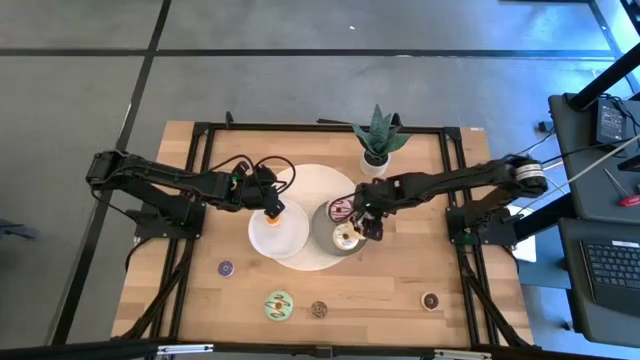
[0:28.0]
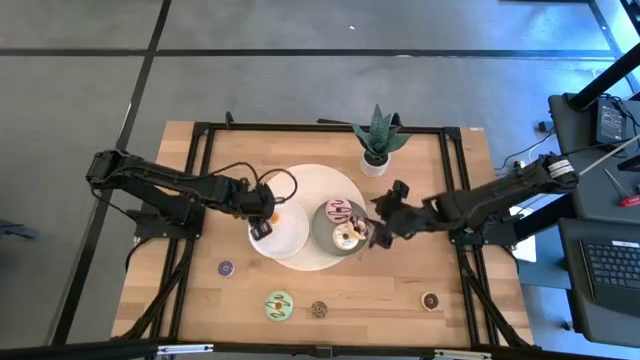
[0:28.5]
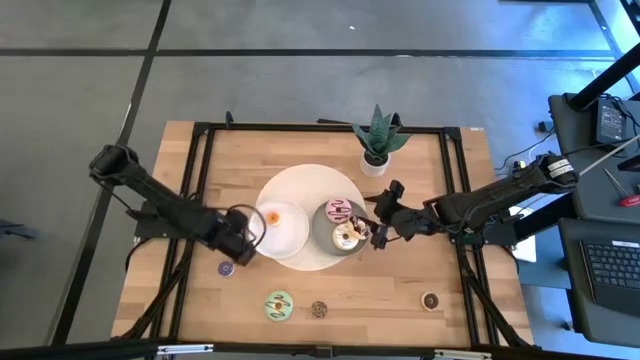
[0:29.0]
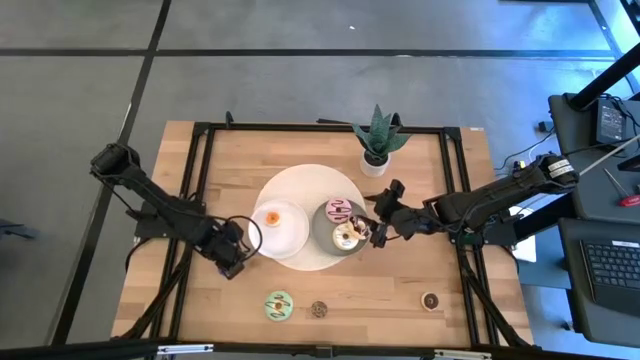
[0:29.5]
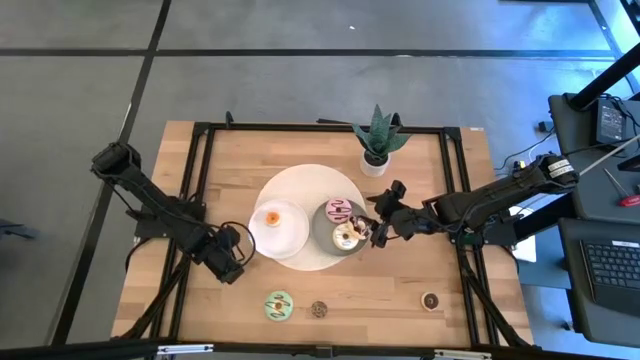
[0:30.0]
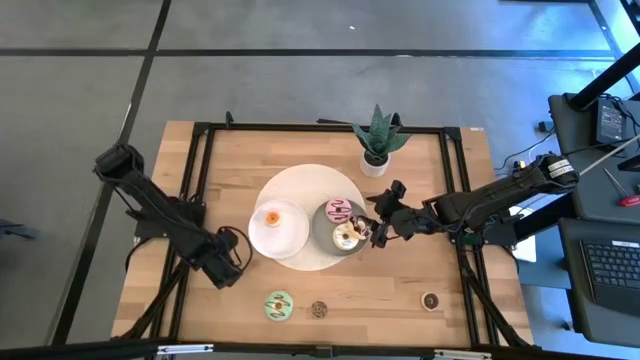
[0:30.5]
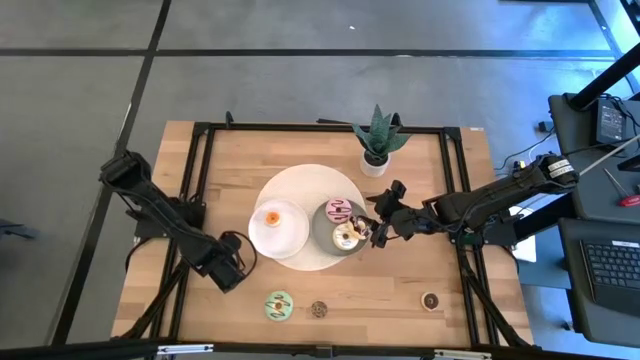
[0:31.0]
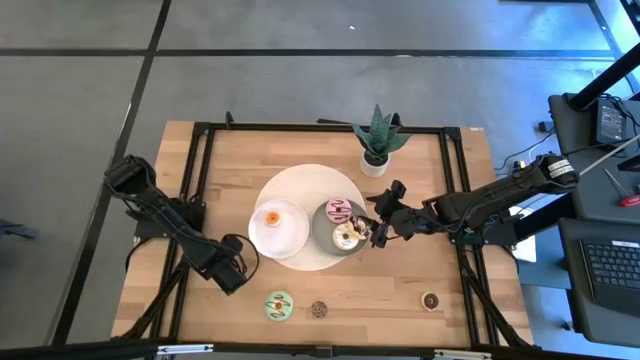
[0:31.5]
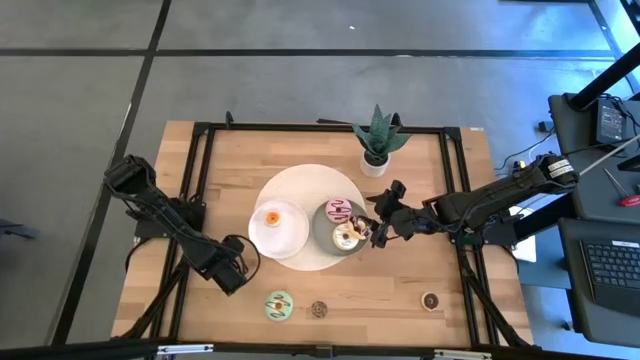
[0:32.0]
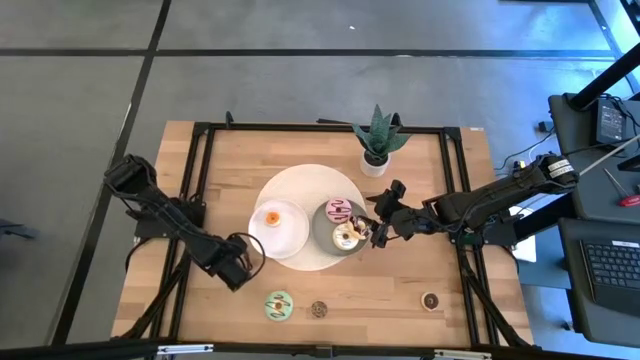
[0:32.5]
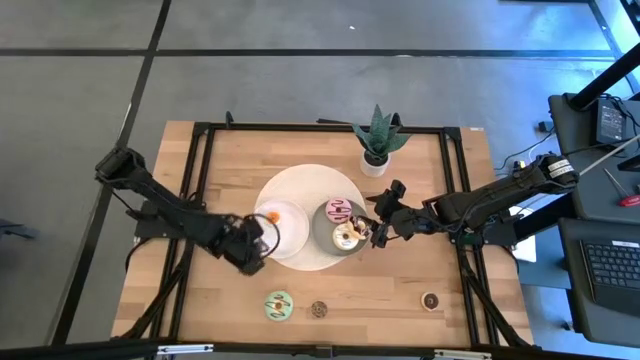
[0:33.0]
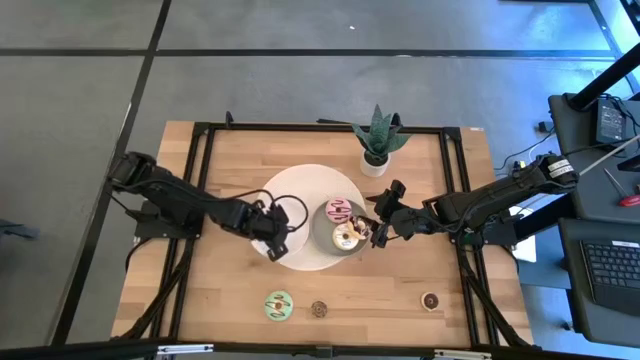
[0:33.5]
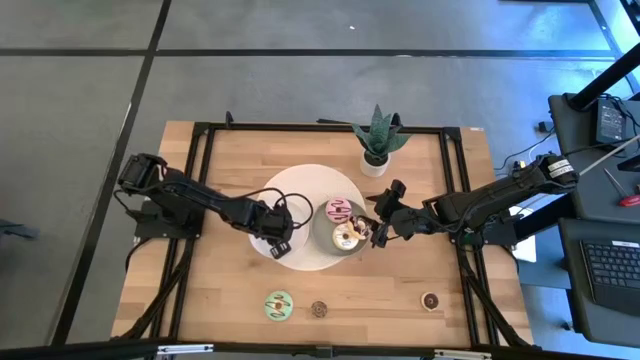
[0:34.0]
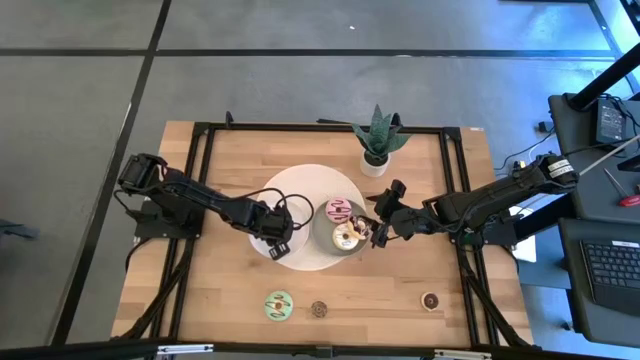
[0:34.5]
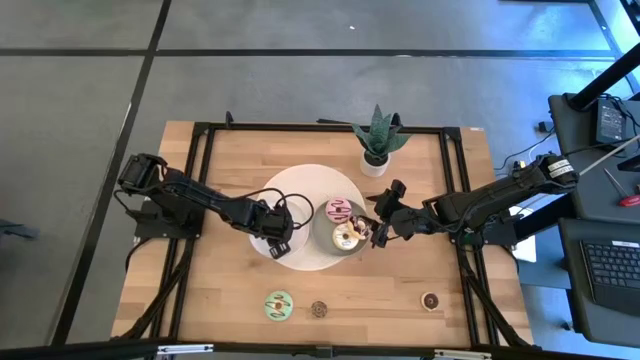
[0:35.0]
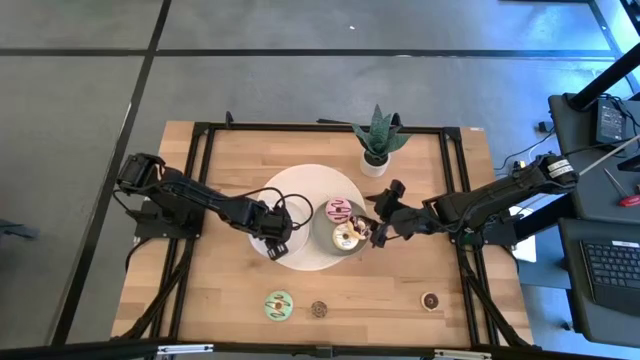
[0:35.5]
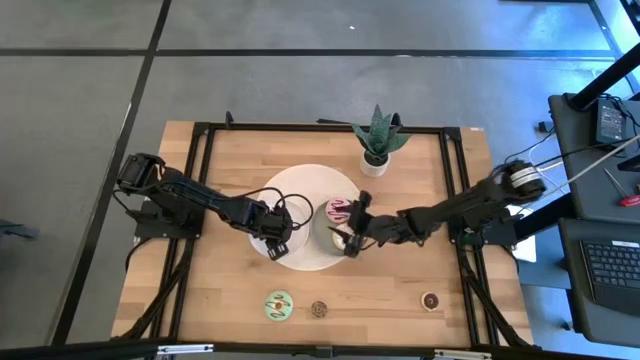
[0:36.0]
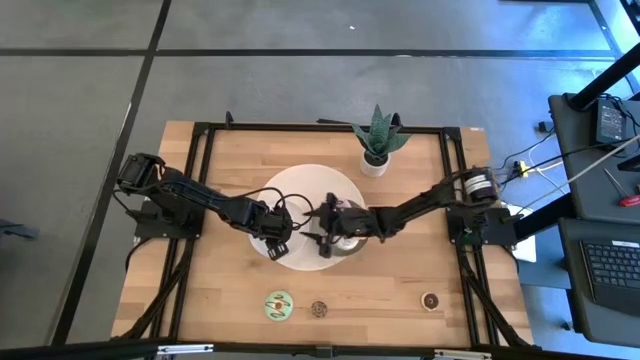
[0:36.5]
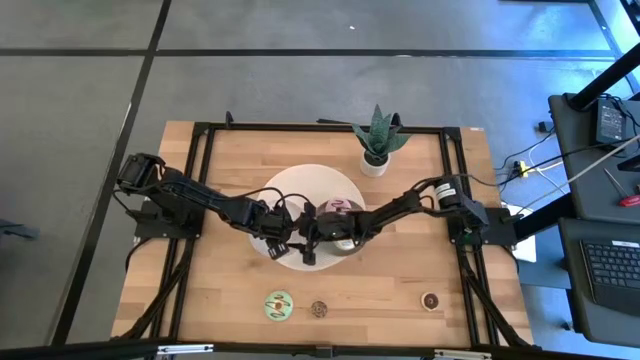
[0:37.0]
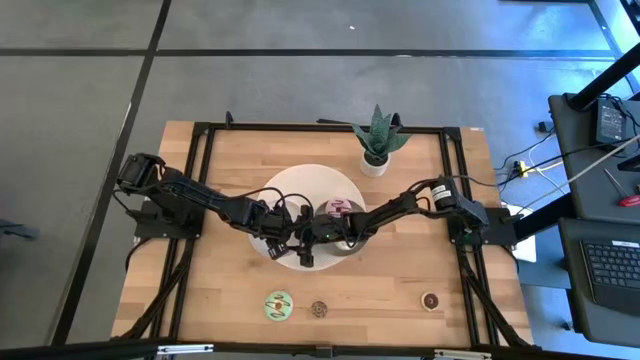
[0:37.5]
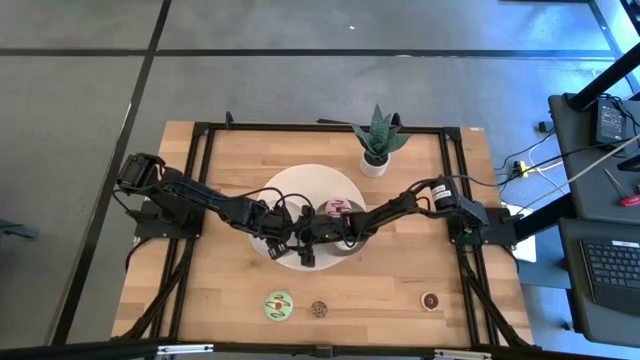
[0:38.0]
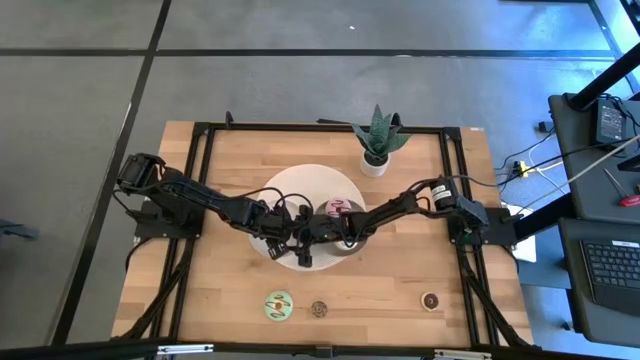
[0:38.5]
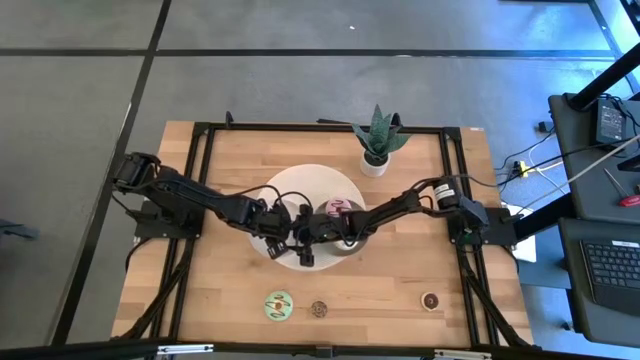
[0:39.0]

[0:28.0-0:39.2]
Task: Pick & Place donuts
Put the small blue donut on the white plate

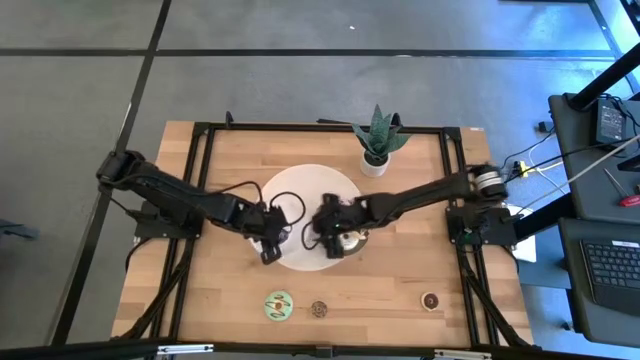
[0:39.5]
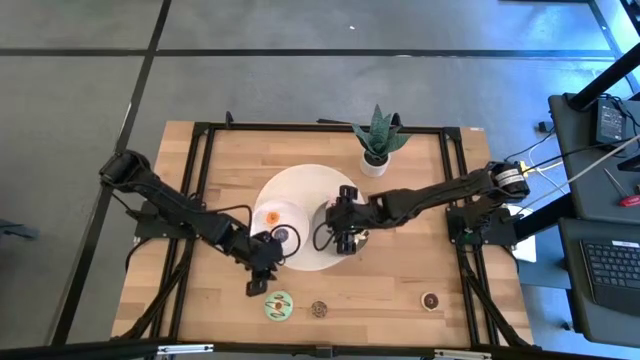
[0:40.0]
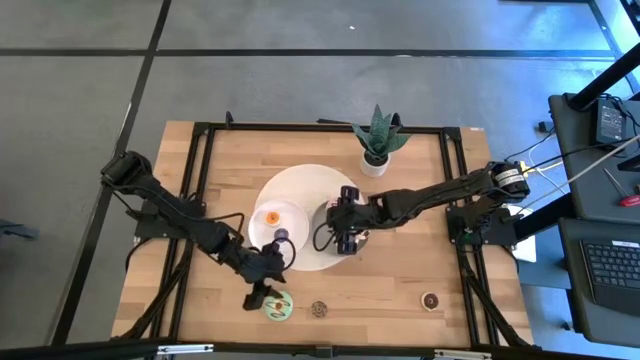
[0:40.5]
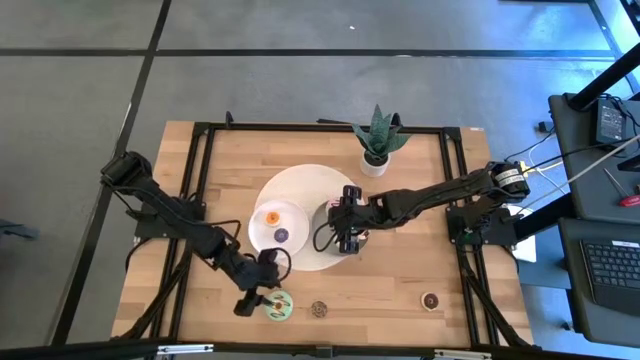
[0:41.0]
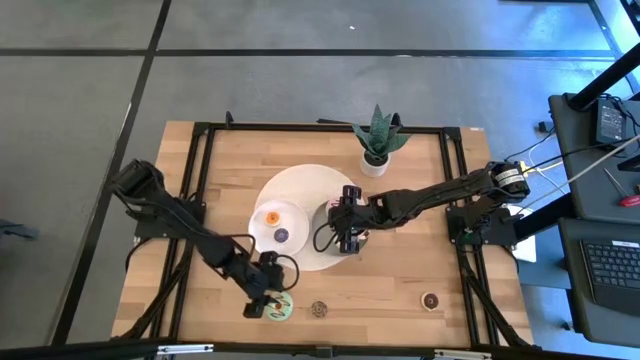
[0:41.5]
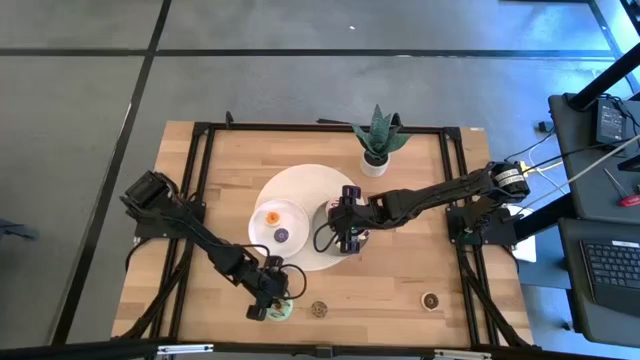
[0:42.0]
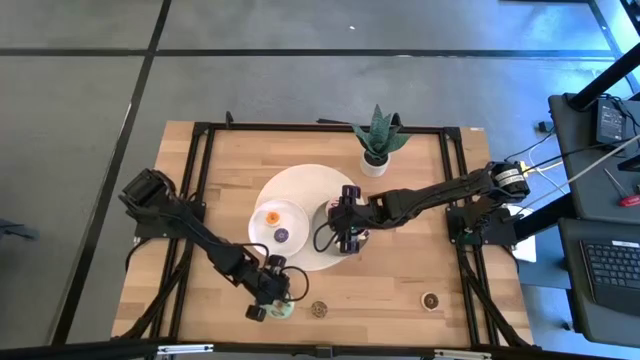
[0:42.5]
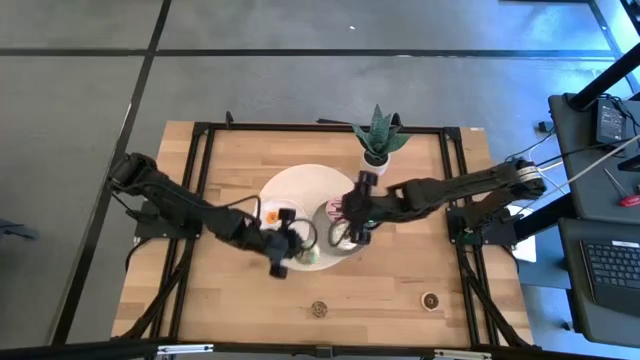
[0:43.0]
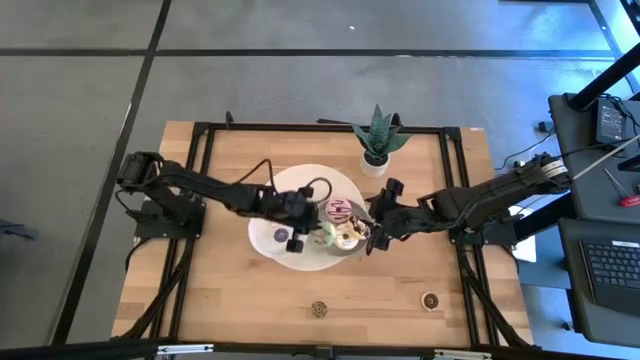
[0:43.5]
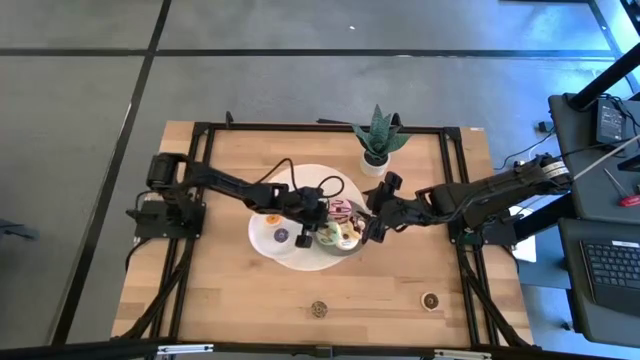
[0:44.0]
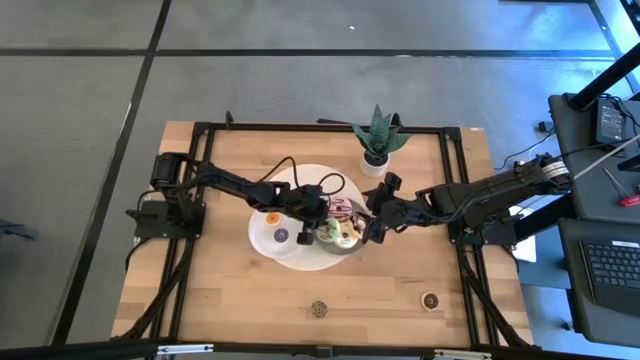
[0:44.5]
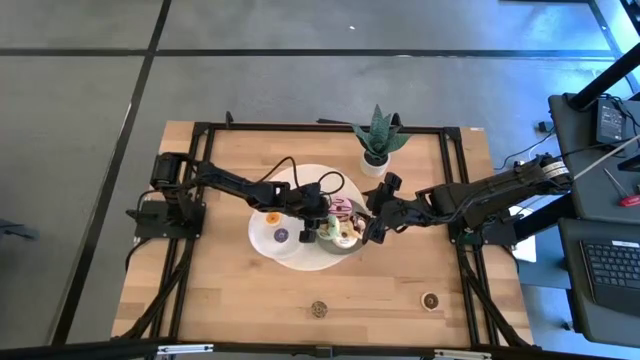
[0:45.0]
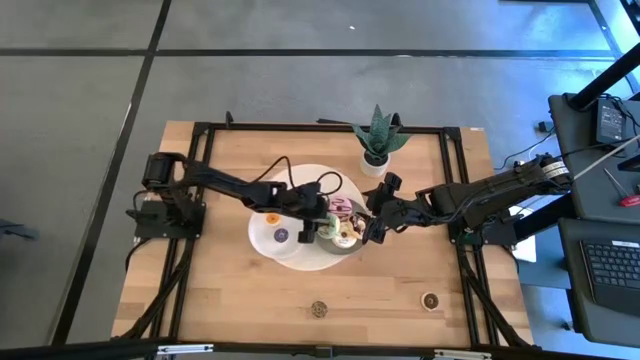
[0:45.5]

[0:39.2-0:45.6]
Put the large green donut on the gray plate
